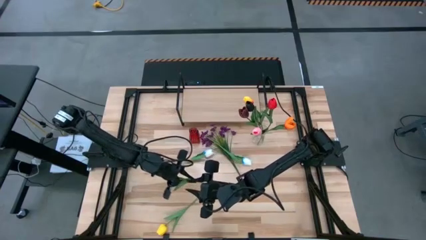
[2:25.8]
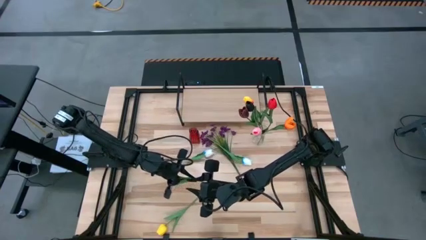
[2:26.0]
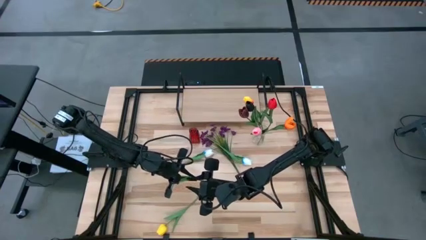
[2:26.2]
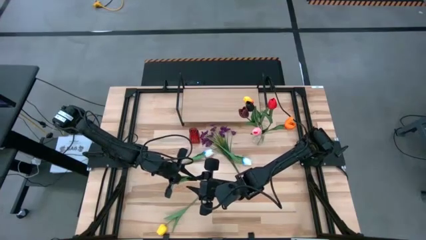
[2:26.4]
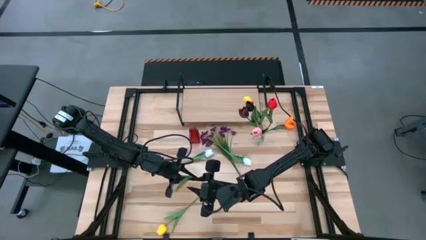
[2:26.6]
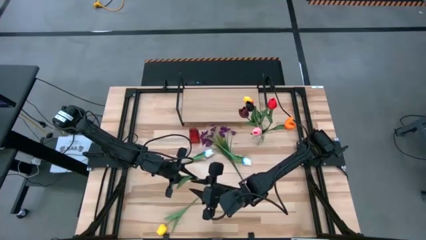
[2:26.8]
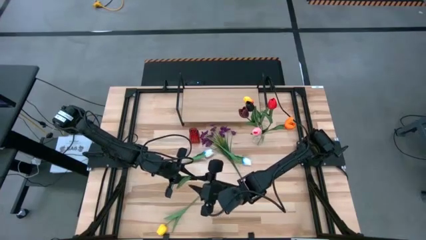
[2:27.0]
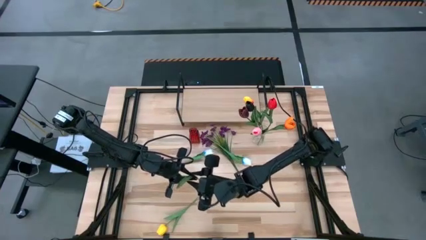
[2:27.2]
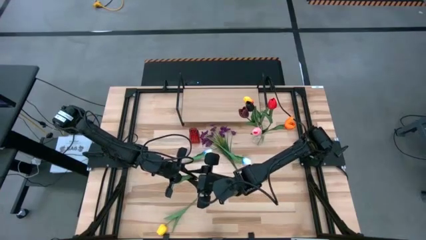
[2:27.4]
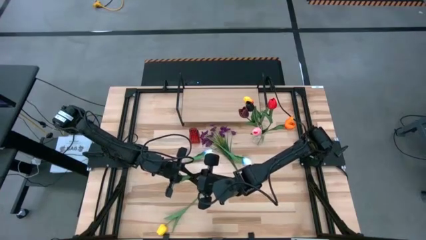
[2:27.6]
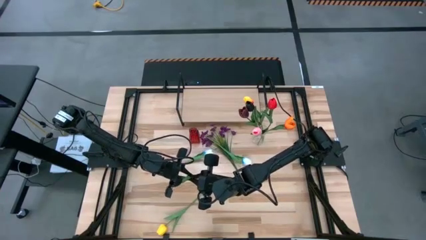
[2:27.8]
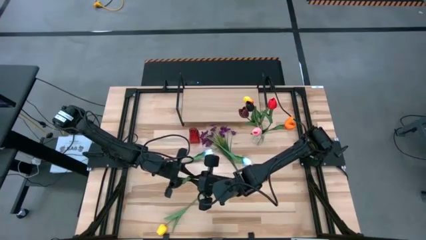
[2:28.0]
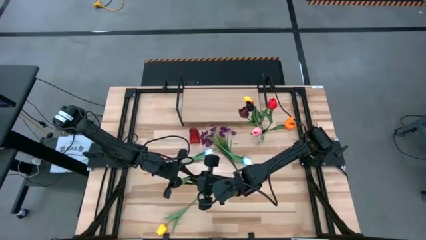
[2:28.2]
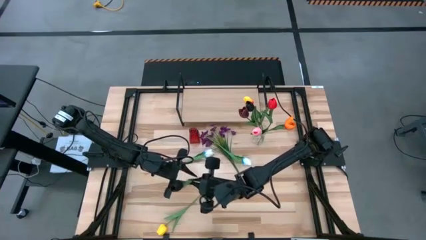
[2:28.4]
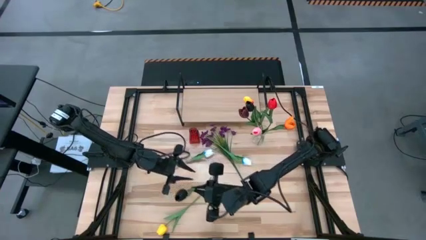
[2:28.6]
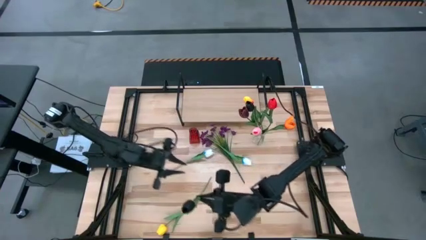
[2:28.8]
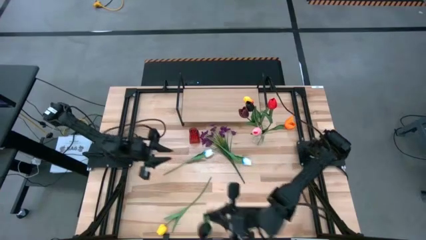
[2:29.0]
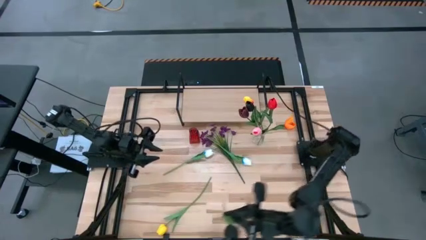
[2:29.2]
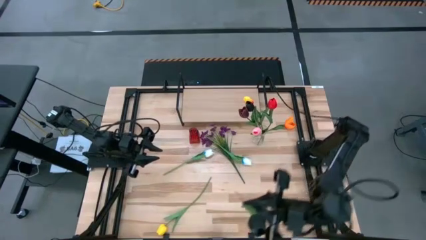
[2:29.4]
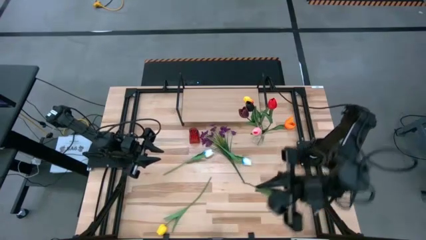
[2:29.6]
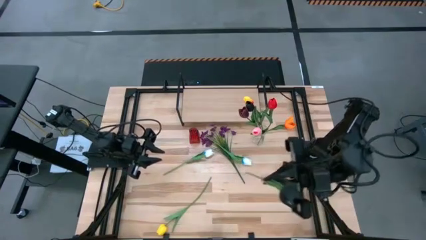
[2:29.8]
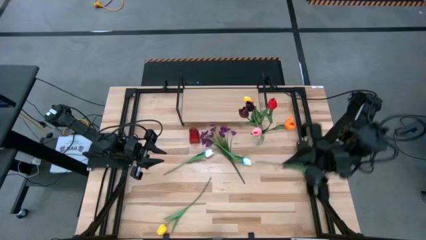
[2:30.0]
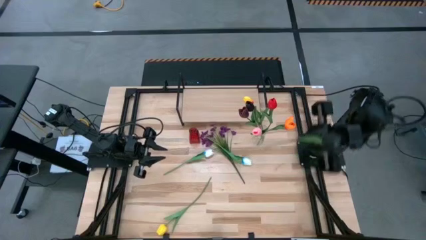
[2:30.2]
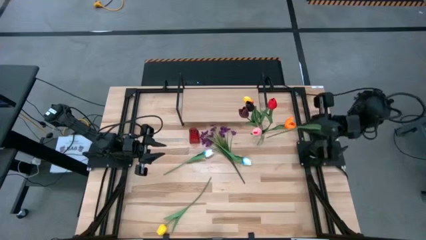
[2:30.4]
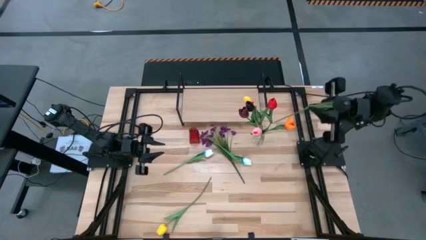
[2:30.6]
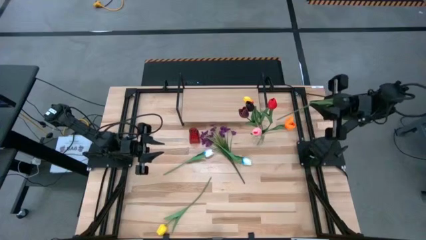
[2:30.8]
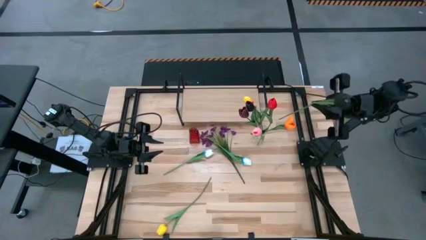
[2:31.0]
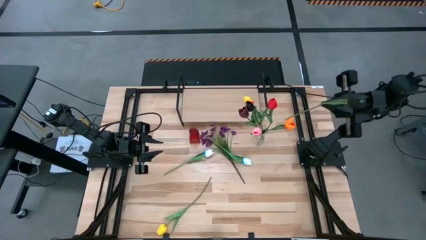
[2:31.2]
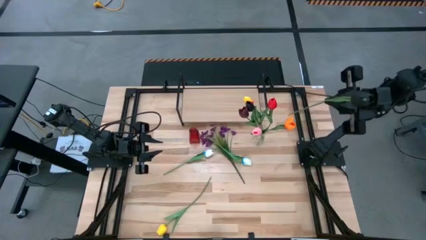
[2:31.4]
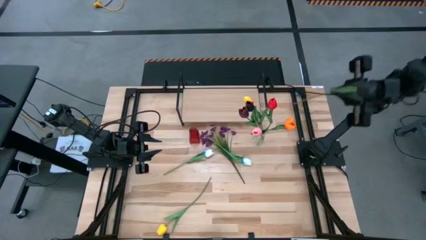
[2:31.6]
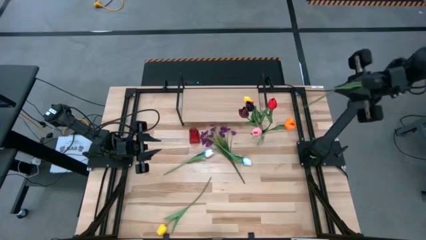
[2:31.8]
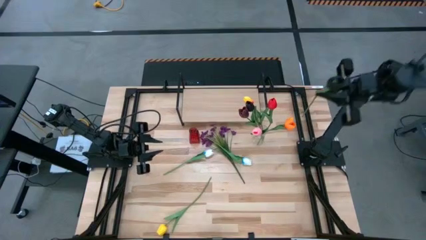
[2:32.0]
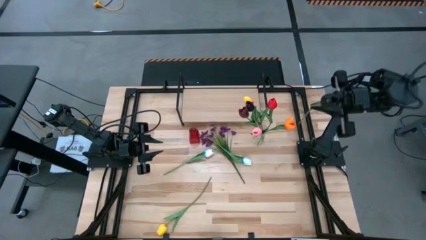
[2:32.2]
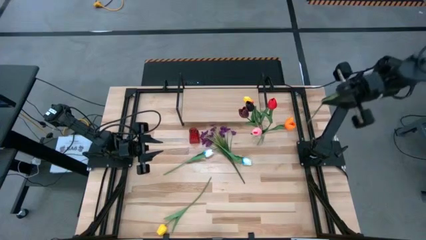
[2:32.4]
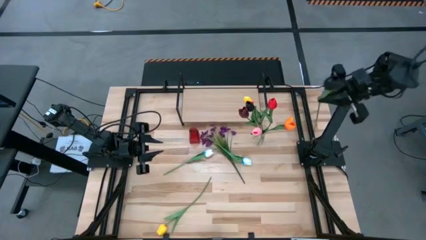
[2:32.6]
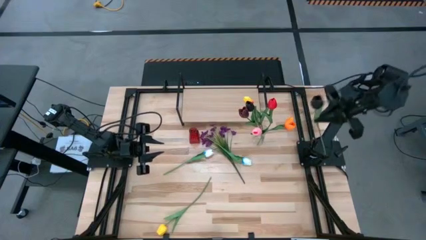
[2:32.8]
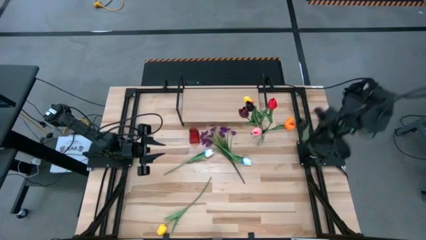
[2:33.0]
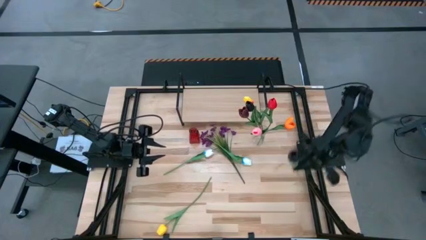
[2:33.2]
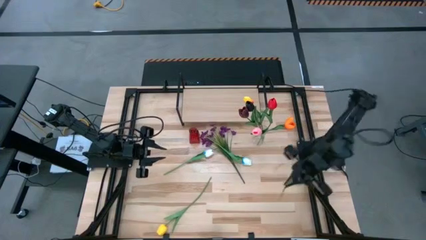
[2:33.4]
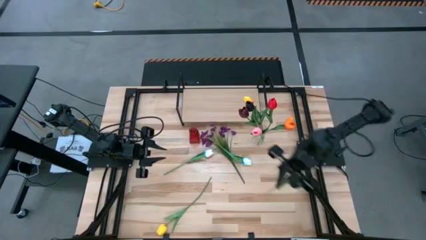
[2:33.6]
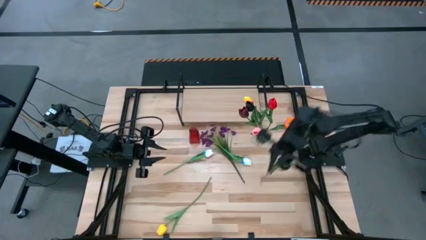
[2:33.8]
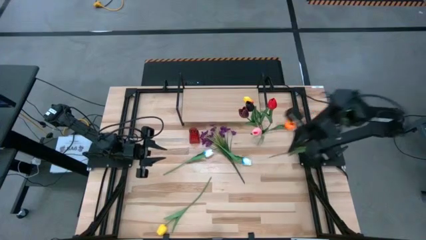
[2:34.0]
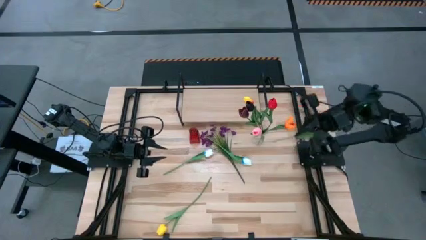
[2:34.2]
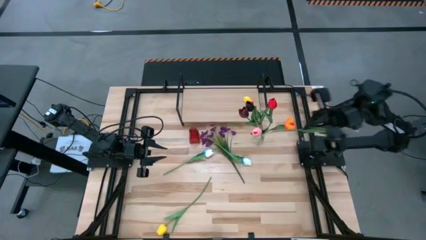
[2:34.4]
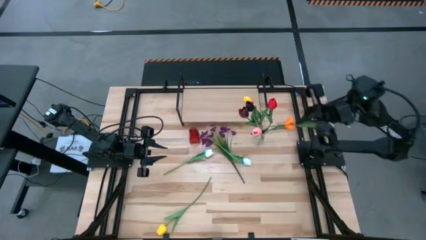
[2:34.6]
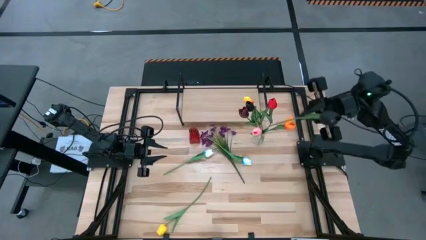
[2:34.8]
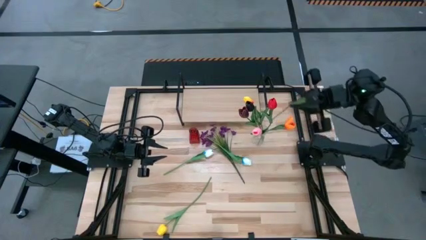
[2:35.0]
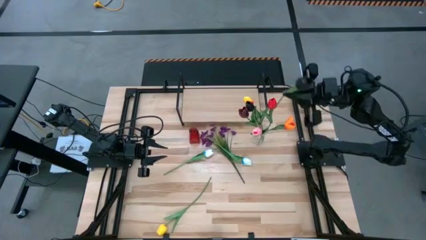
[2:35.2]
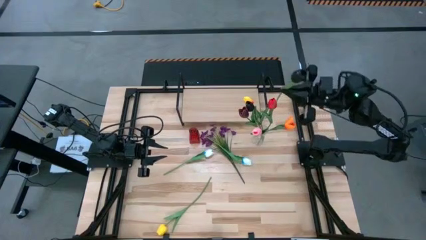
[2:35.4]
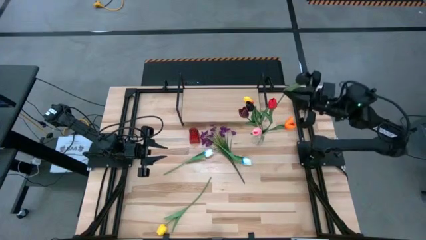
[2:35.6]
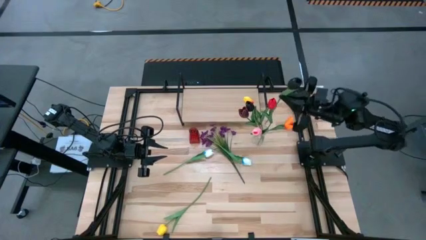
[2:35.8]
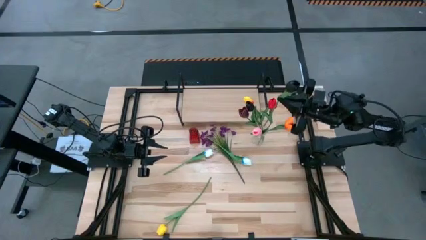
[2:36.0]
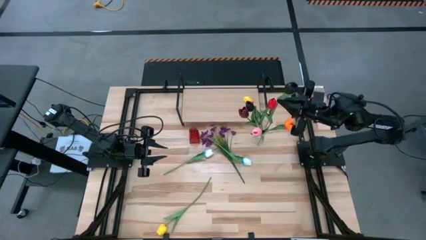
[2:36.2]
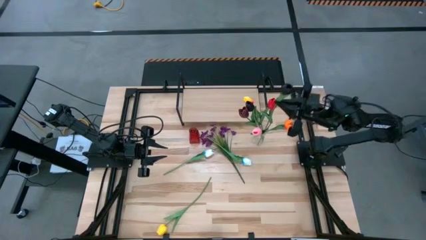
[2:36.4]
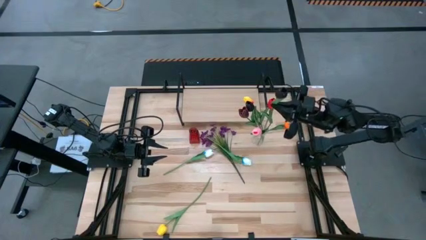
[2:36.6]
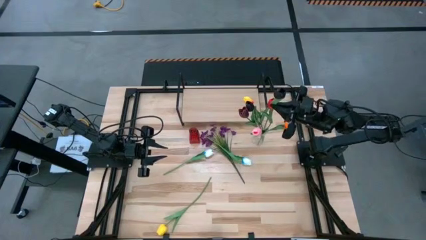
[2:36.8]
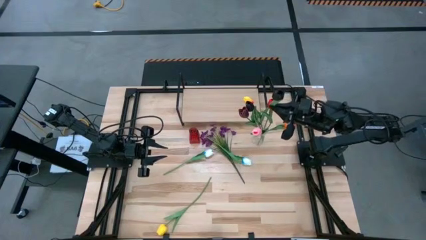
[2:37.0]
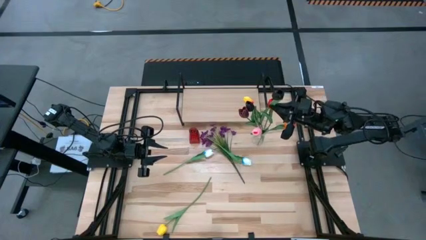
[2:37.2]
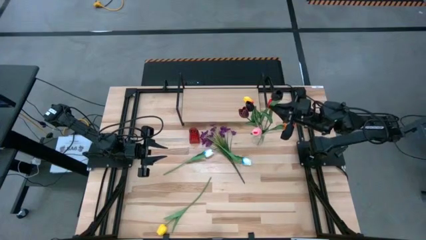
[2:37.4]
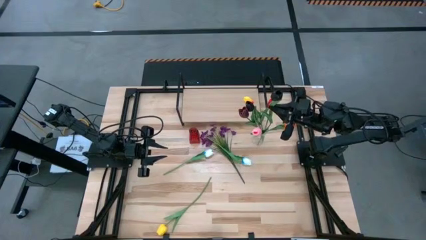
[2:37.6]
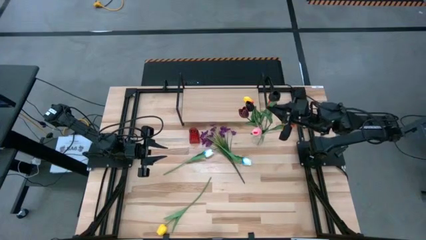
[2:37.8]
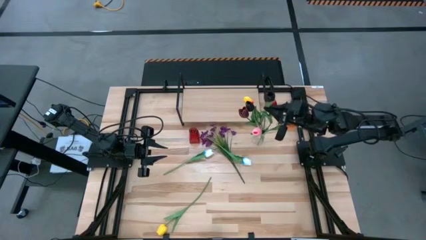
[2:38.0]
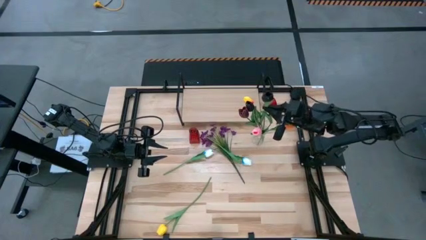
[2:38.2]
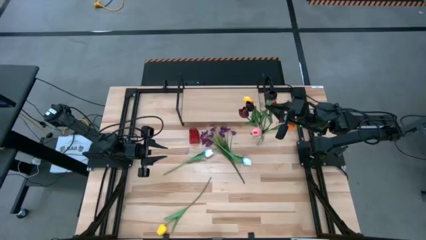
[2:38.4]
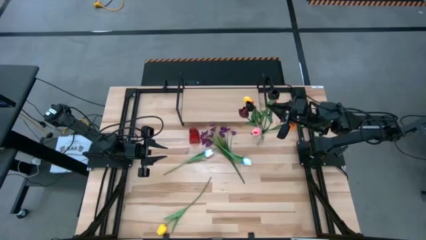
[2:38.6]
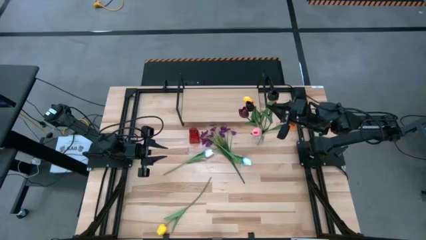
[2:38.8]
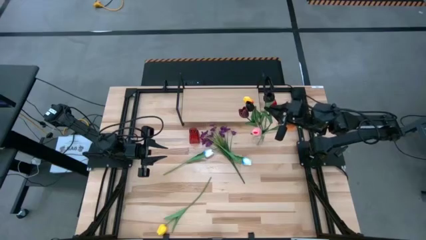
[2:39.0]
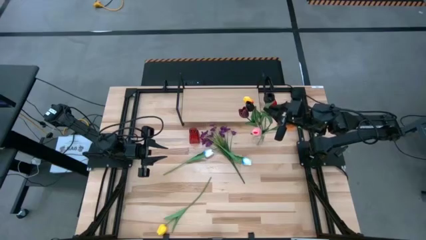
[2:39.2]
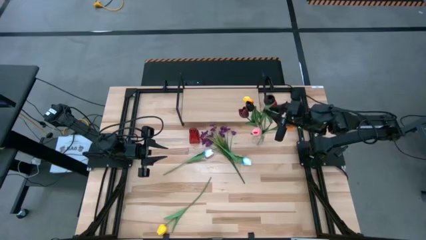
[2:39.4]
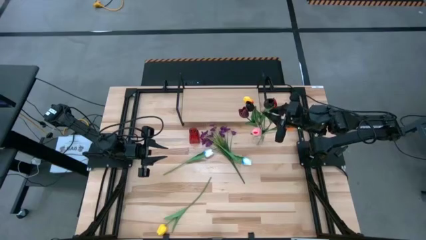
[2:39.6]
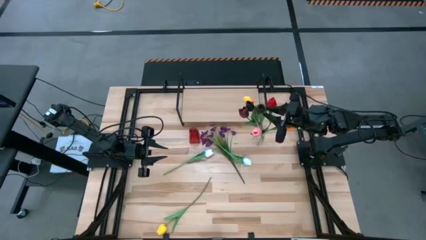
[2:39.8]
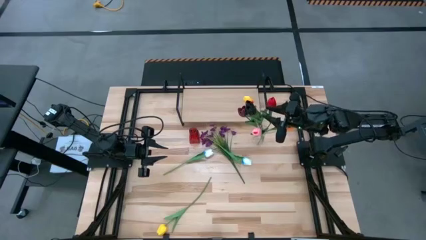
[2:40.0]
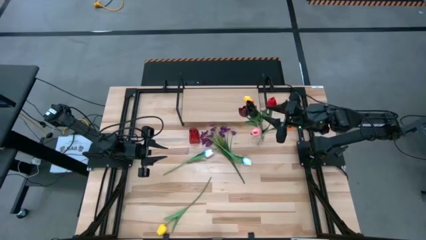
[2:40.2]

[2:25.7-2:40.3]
Task: Pick and place flowers into a vace then onto a shelf
Put the black flower into the transparent vase
